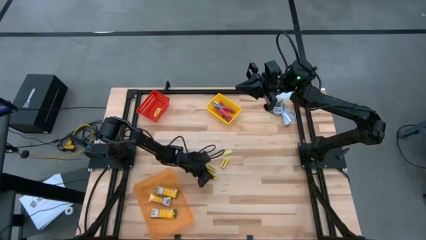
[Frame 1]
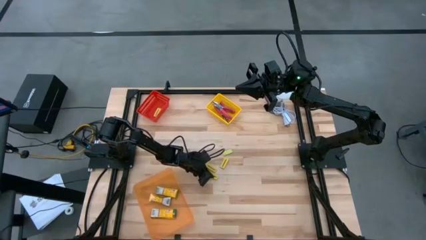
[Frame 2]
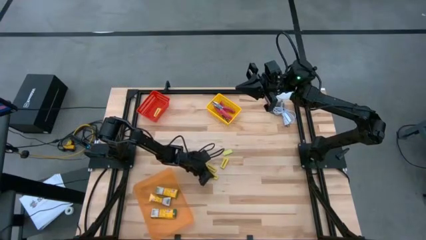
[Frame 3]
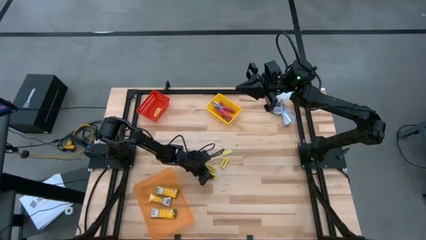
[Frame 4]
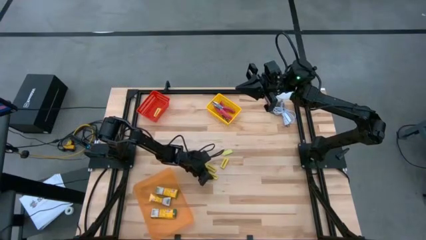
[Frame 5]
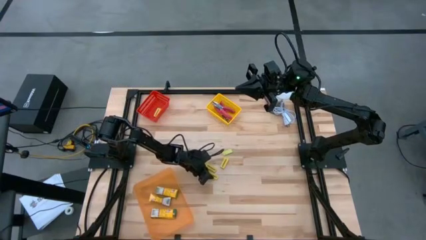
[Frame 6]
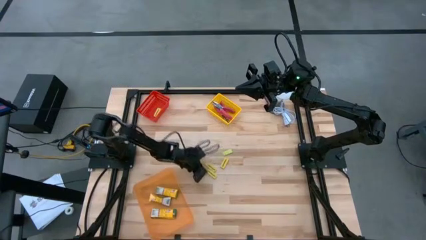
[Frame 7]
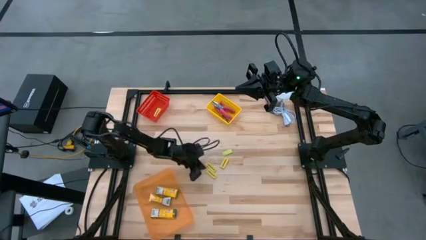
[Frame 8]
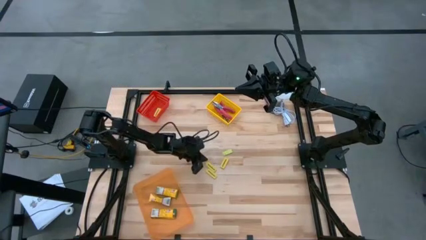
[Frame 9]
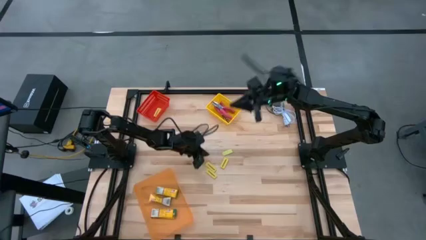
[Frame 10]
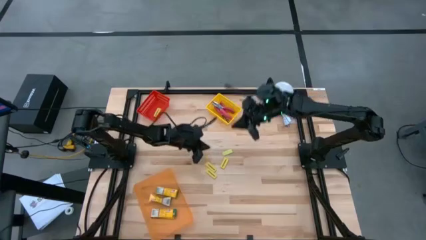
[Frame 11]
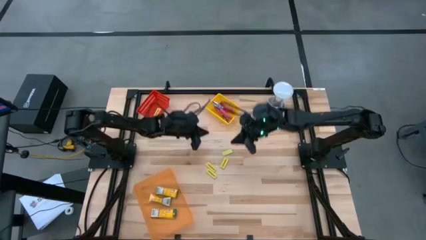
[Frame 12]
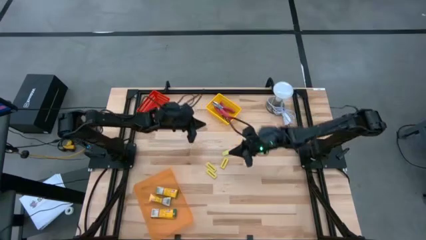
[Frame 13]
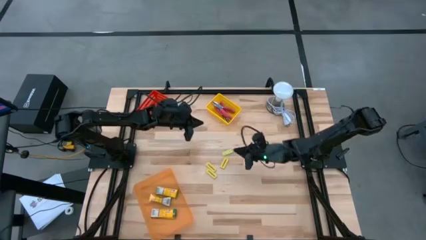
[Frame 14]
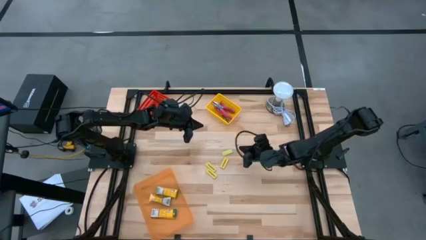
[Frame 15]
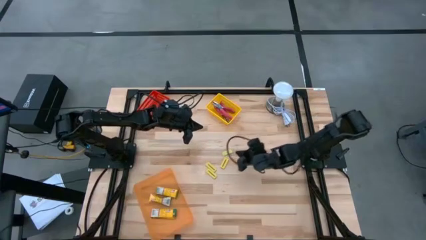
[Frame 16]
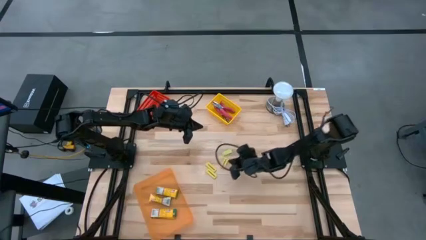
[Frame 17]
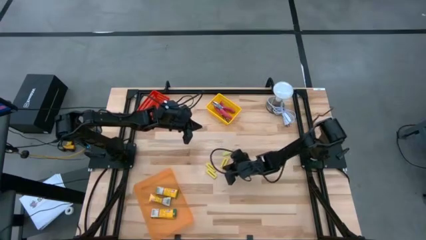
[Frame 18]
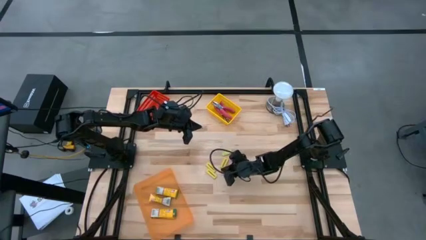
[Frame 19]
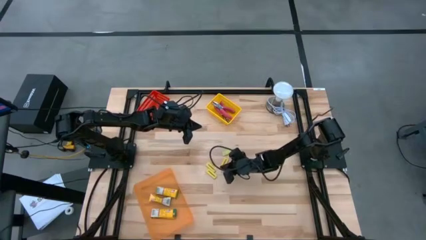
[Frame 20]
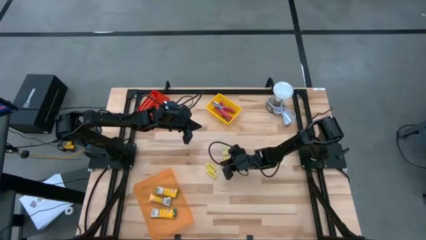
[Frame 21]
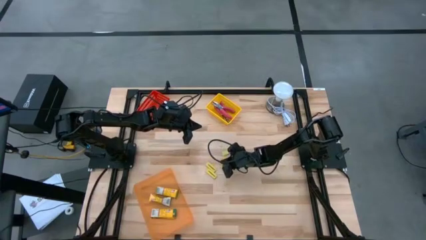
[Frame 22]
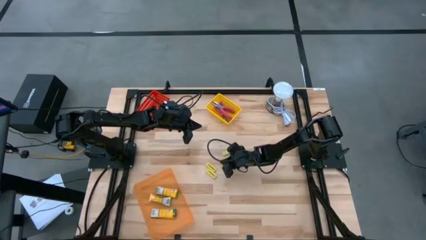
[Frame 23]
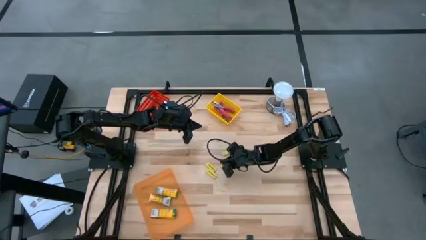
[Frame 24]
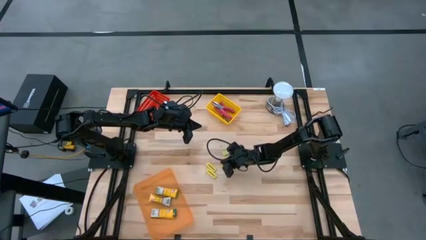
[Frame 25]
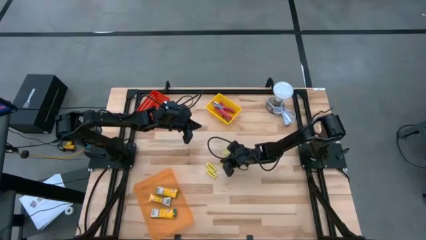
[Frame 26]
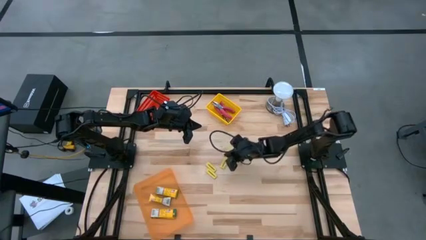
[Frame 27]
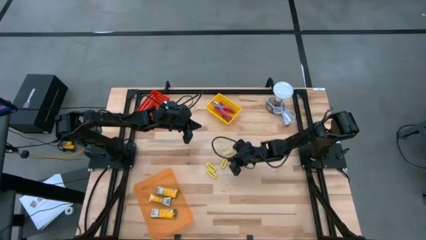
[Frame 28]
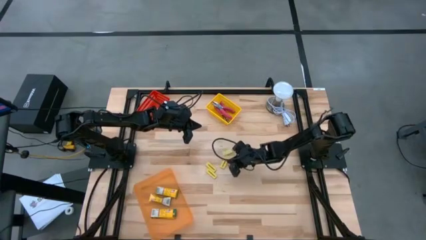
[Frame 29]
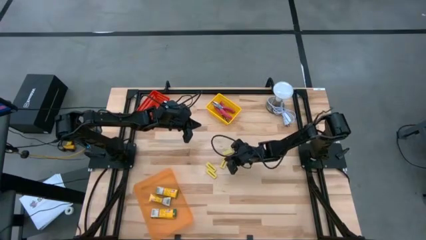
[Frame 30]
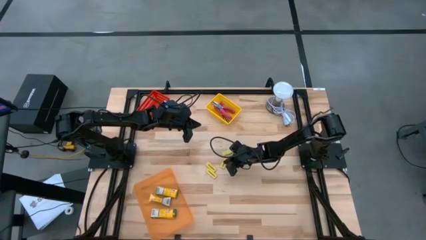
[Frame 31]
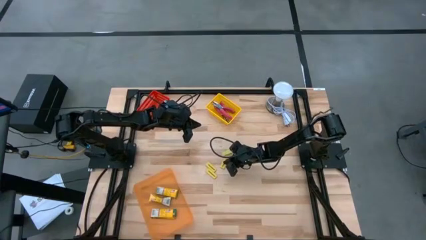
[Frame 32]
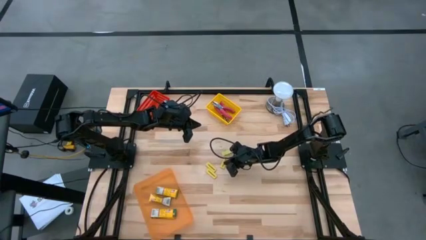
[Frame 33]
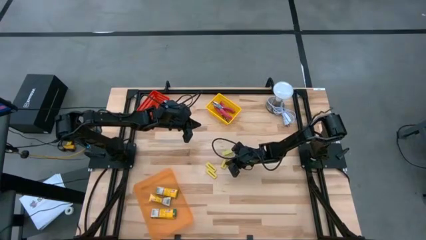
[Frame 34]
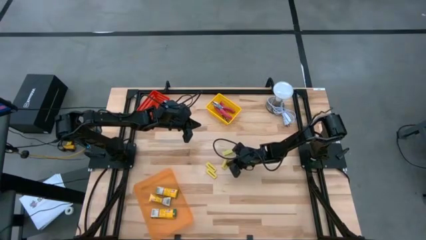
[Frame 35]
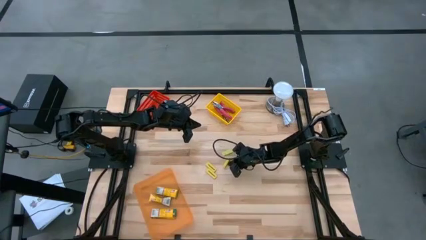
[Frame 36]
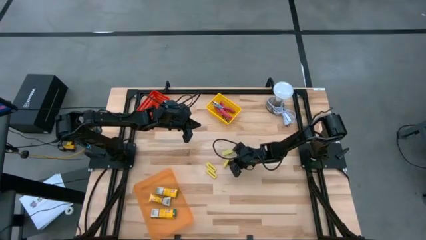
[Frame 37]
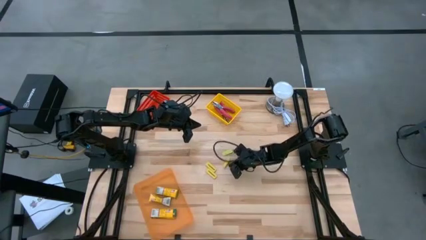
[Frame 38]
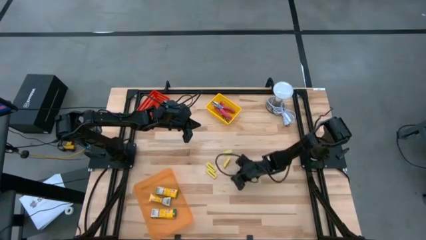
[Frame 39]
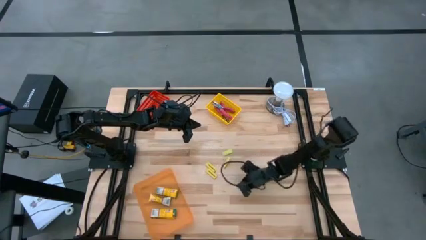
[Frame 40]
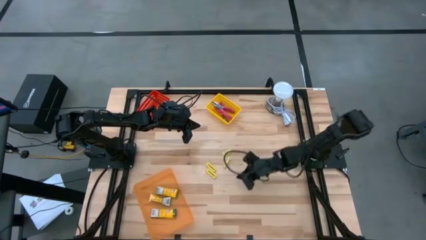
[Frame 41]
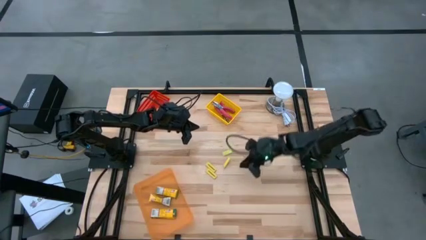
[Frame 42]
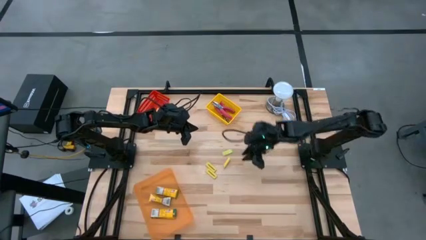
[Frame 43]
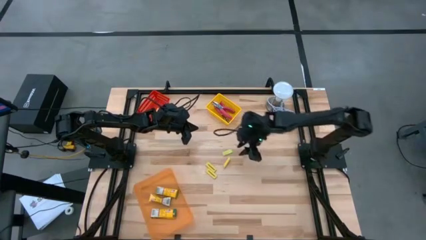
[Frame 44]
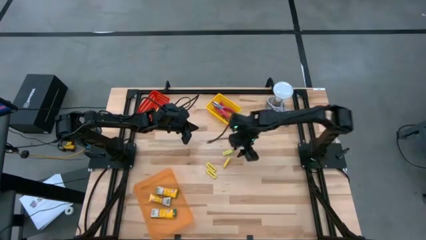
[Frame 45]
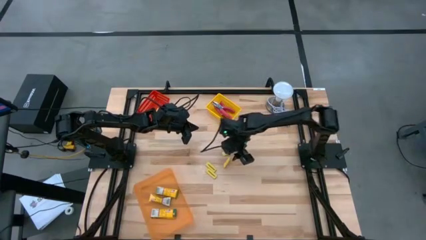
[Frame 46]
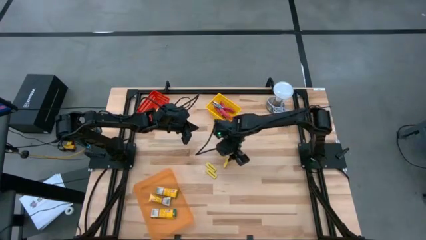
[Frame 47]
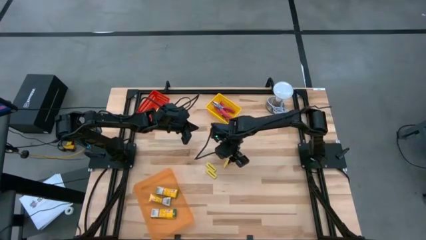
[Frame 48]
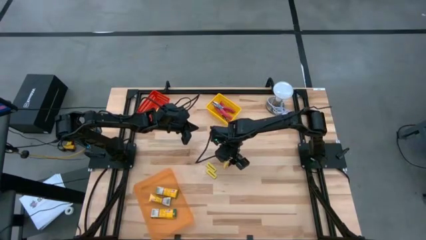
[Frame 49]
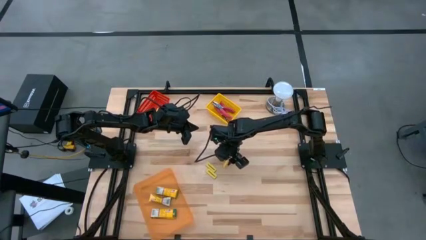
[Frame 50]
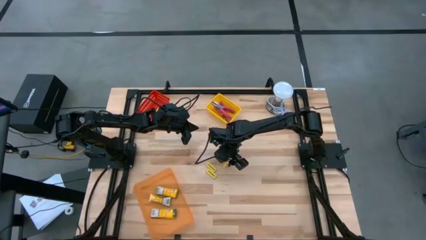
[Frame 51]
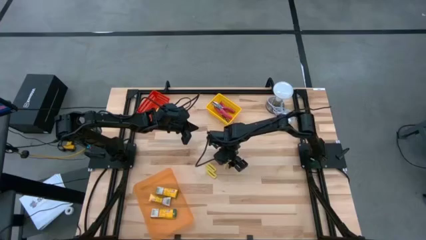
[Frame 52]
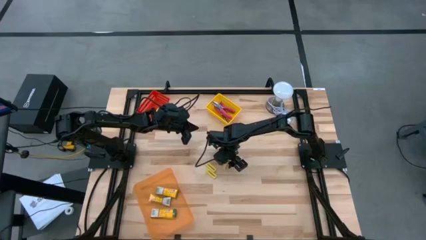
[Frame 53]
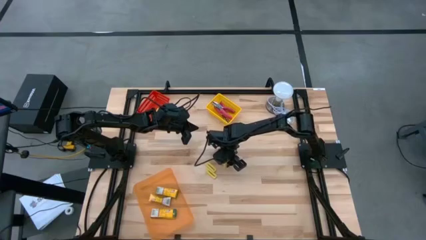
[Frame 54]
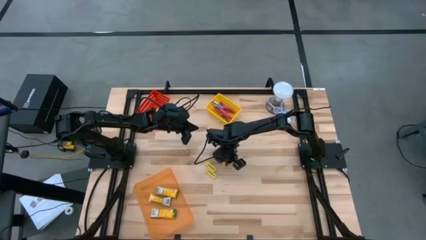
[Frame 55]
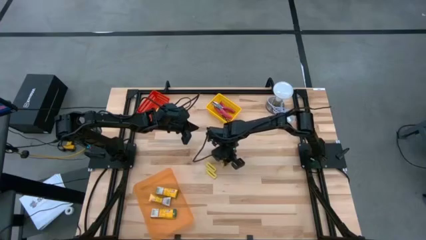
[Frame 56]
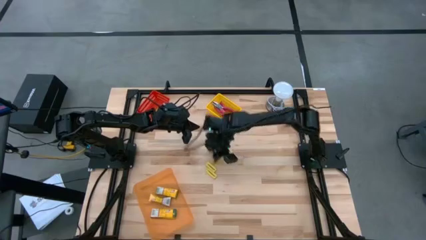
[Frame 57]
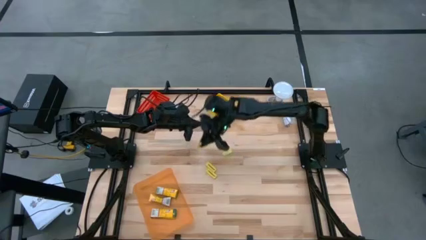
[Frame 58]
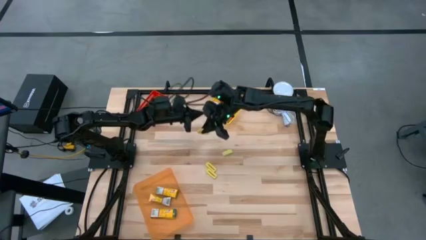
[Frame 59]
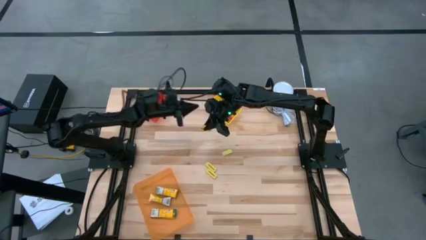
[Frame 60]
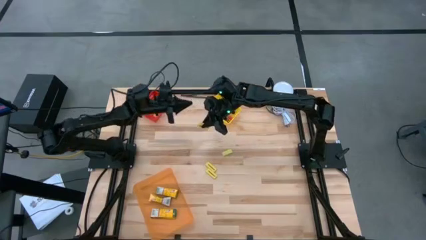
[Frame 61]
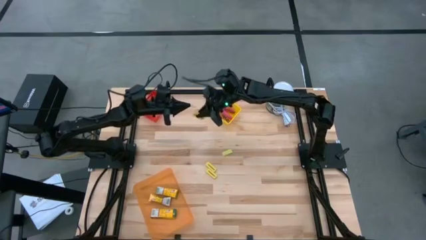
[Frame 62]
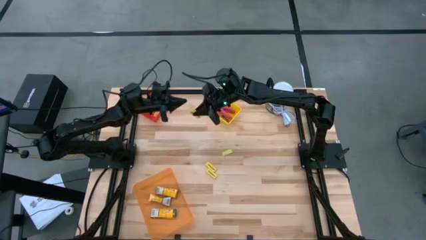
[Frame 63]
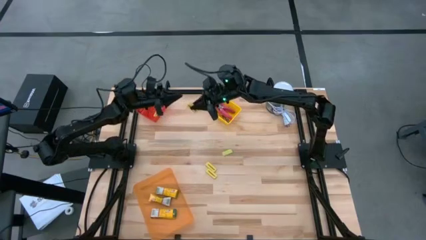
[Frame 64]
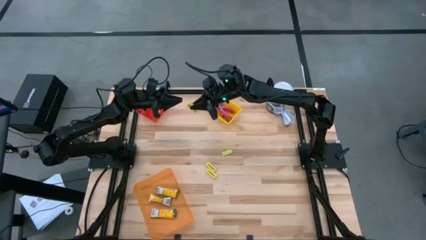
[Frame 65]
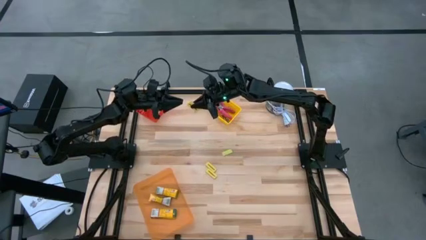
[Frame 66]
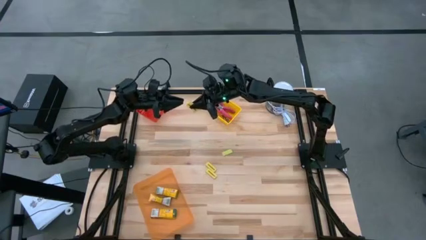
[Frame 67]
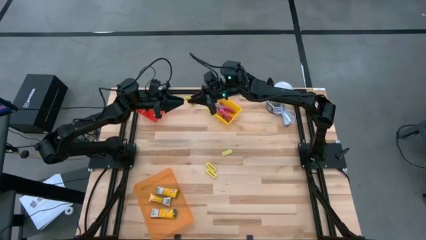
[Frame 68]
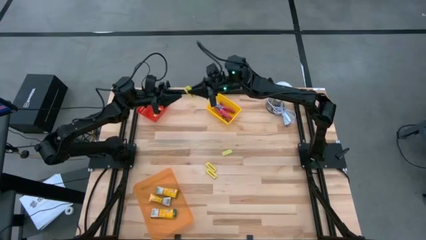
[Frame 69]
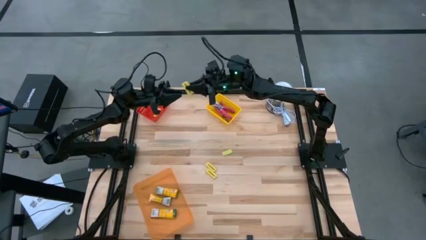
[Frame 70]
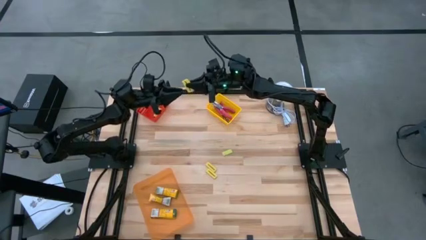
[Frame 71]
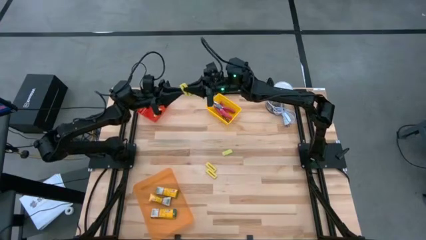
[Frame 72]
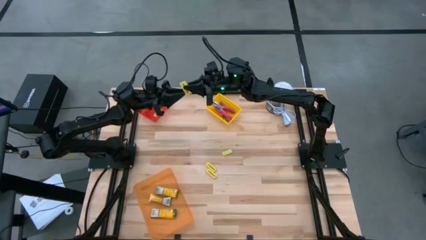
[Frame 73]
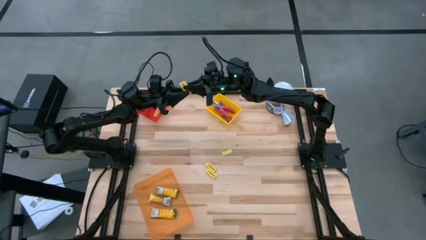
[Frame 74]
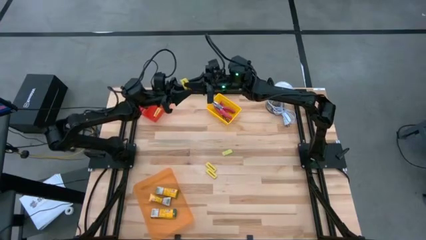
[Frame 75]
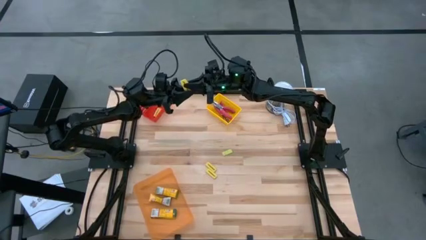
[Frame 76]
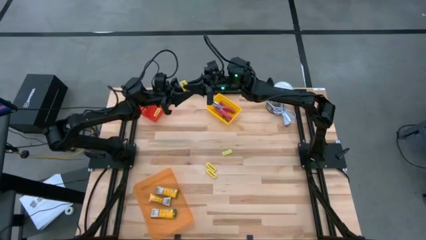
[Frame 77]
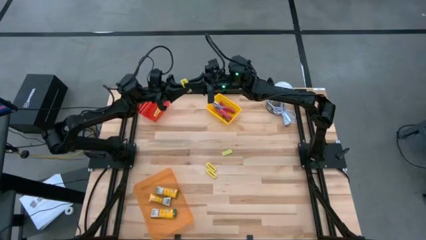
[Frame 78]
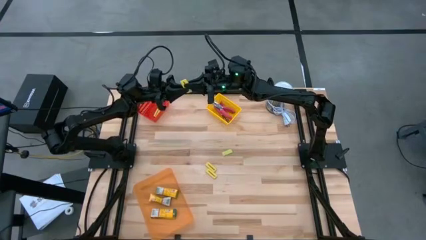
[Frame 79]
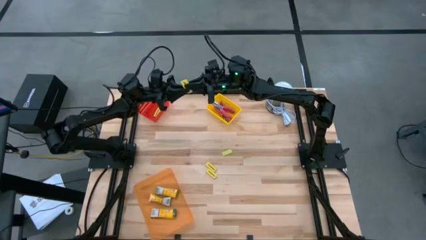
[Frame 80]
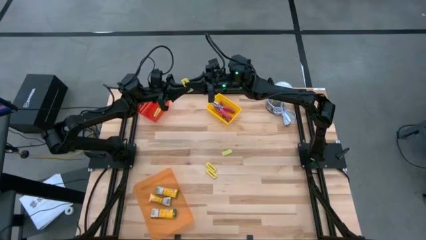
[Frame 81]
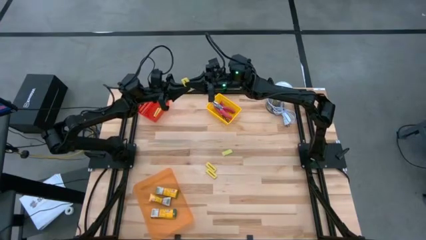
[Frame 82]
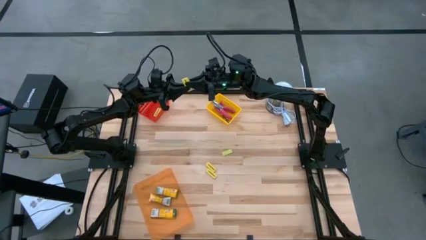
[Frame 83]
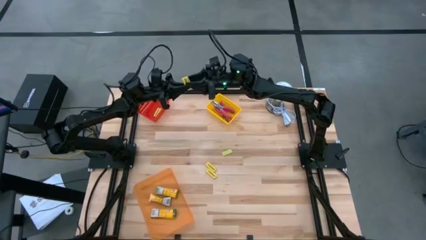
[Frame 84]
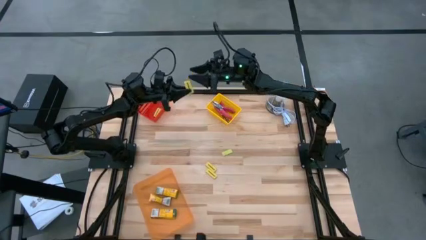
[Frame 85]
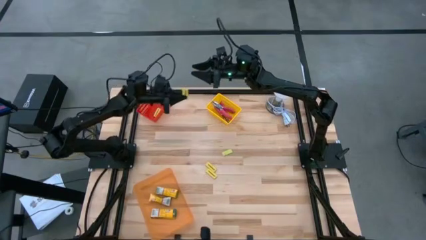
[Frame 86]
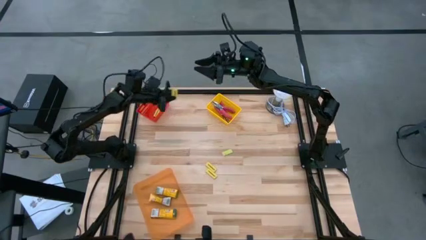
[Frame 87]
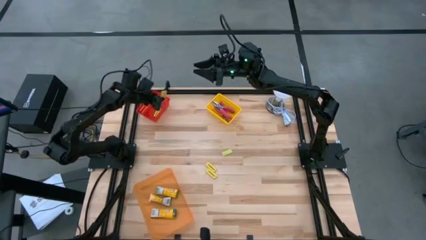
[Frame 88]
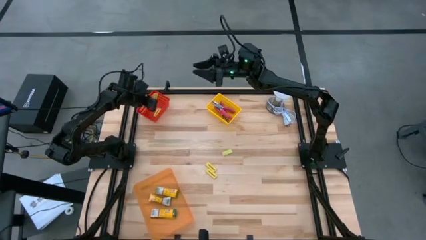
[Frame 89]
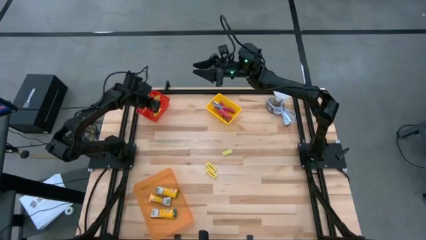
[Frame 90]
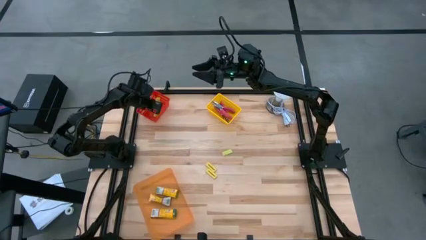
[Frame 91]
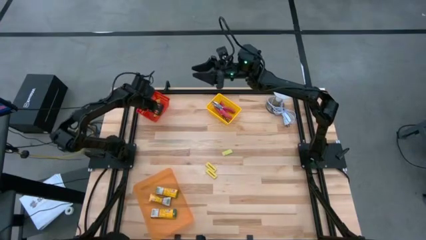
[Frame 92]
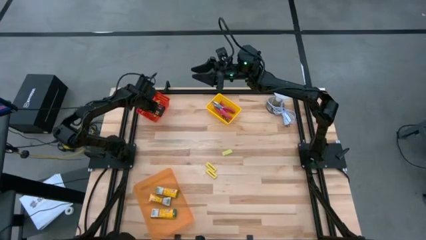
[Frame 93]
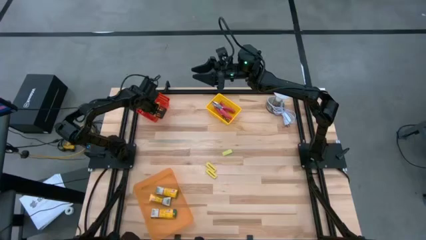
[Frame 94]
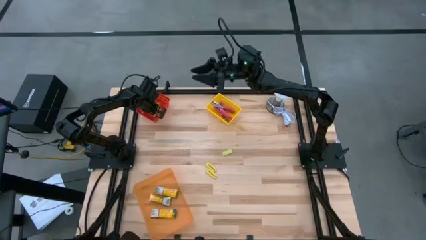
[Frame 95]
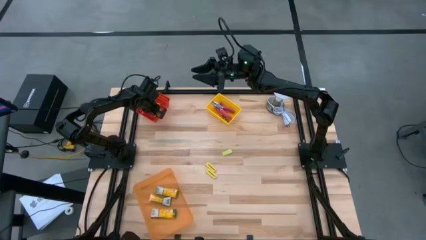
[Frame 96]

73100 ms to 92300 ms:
Task: Pick & Place School Supplies
Put the yellow eraser into the red bin
